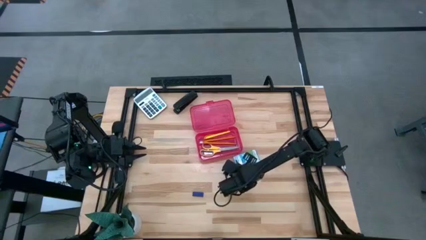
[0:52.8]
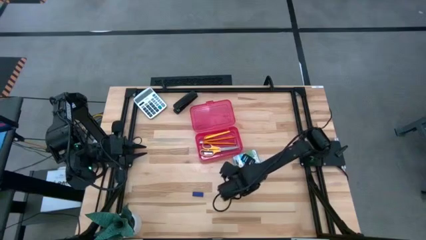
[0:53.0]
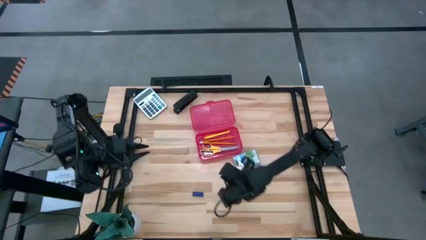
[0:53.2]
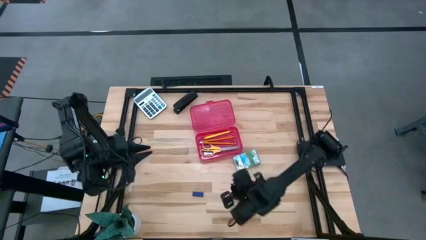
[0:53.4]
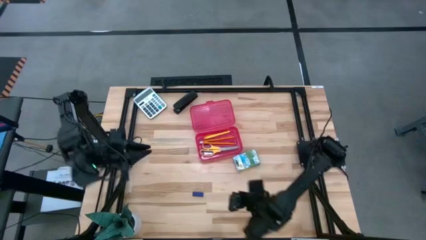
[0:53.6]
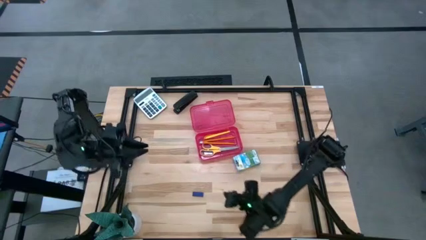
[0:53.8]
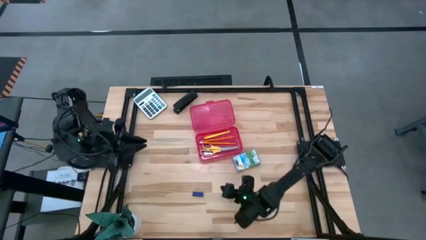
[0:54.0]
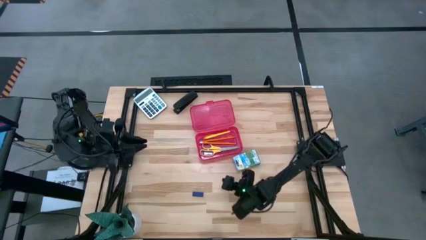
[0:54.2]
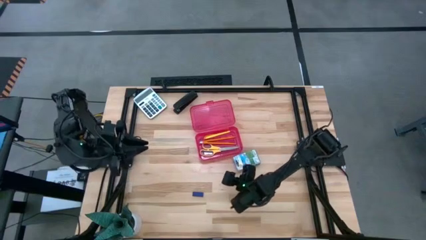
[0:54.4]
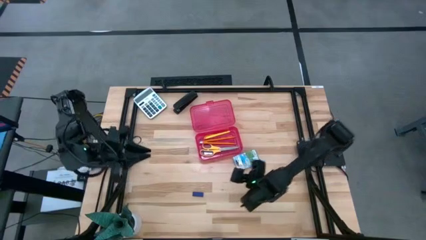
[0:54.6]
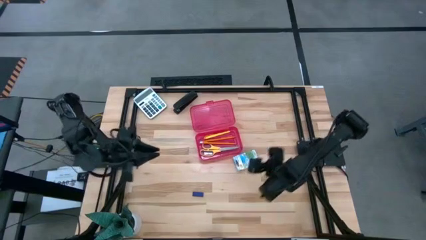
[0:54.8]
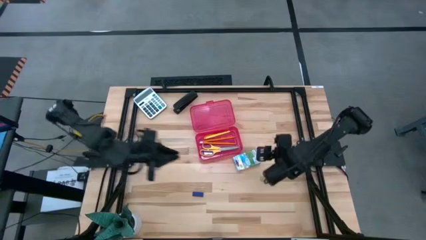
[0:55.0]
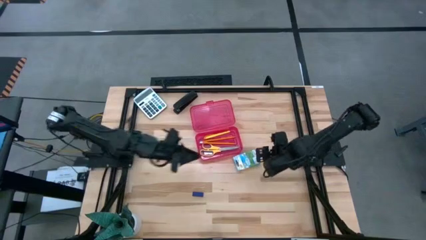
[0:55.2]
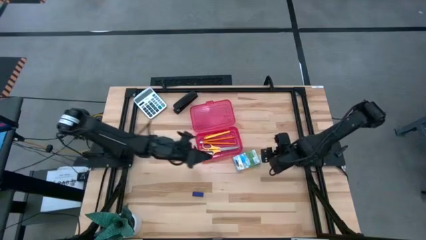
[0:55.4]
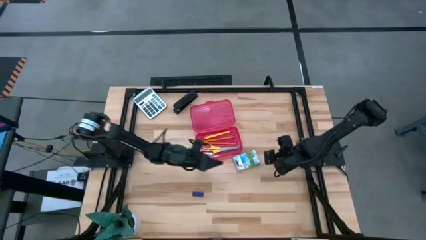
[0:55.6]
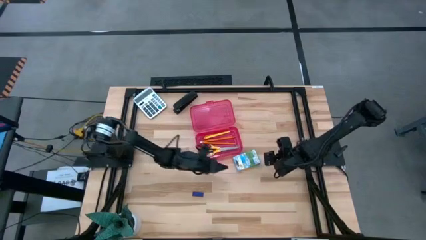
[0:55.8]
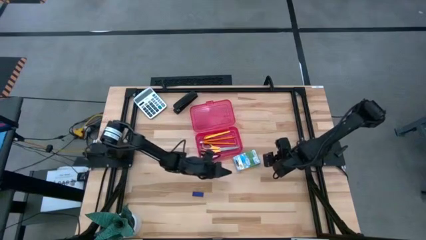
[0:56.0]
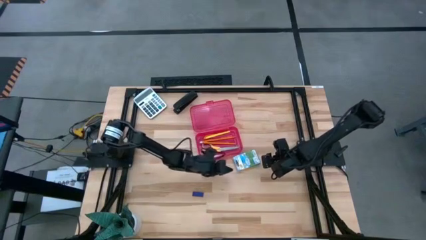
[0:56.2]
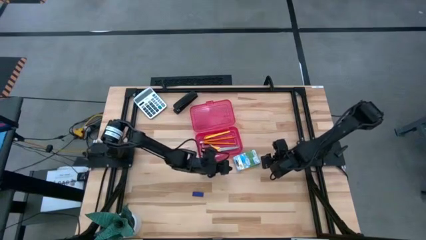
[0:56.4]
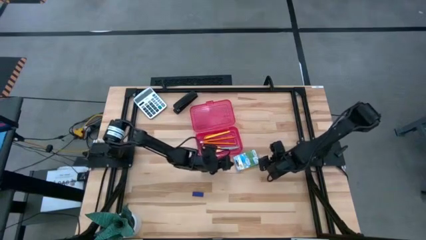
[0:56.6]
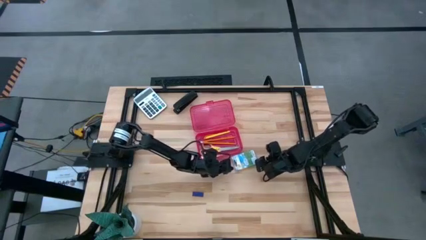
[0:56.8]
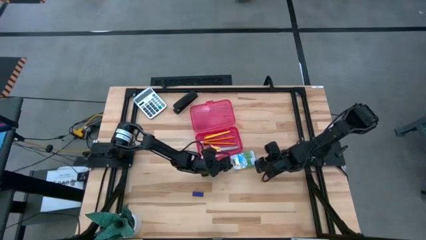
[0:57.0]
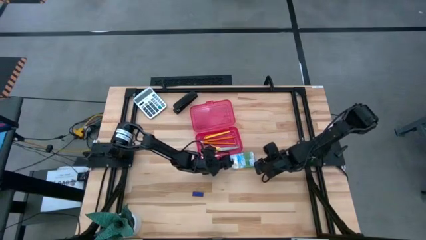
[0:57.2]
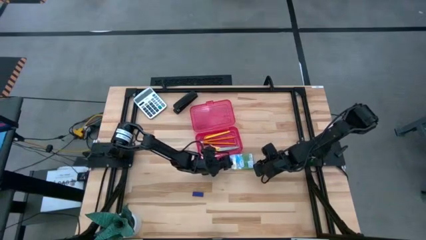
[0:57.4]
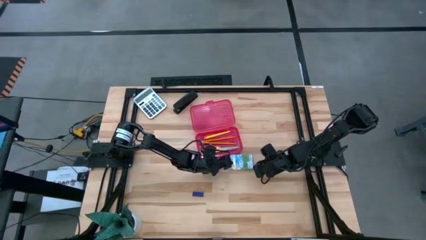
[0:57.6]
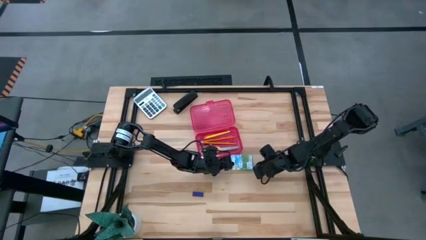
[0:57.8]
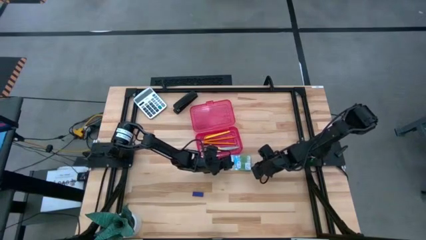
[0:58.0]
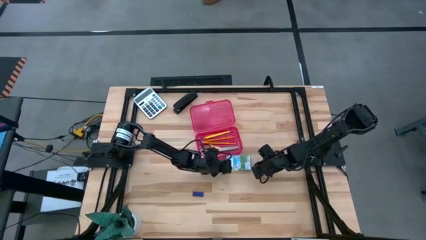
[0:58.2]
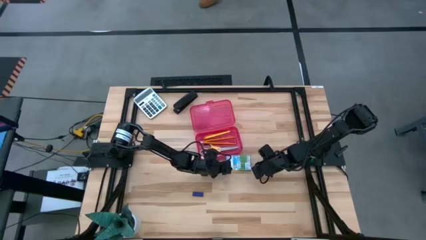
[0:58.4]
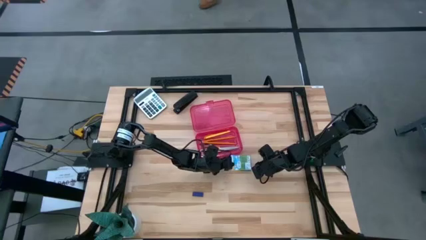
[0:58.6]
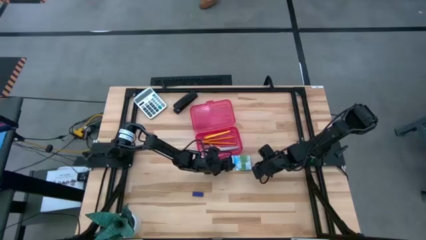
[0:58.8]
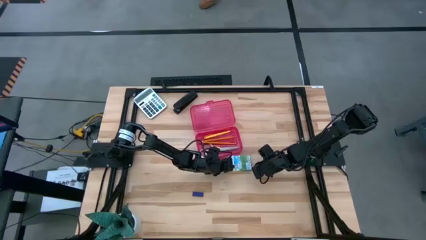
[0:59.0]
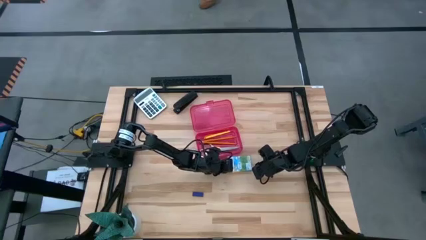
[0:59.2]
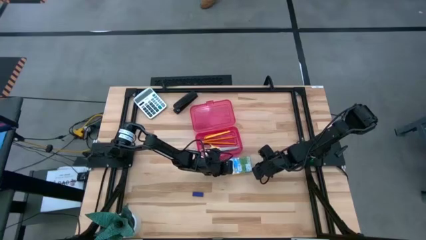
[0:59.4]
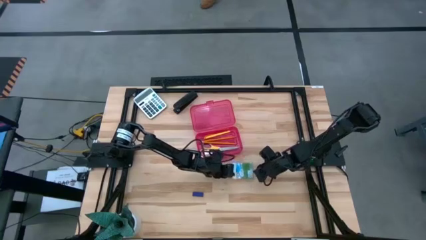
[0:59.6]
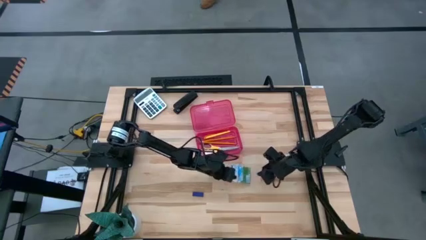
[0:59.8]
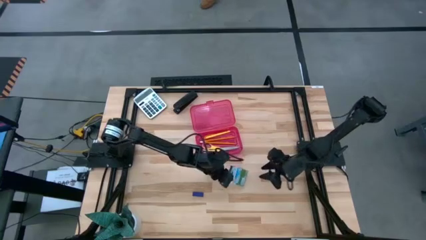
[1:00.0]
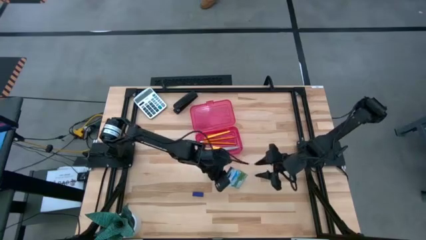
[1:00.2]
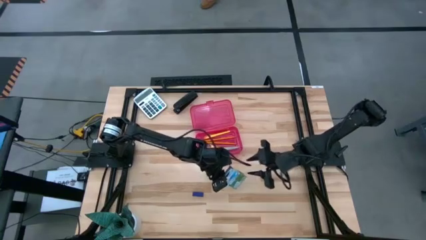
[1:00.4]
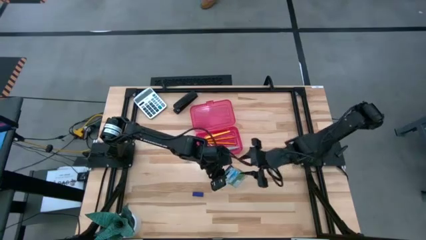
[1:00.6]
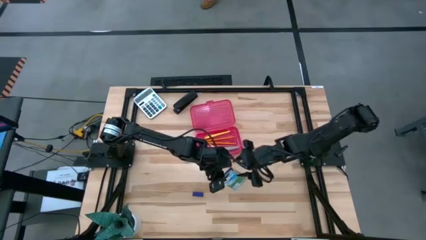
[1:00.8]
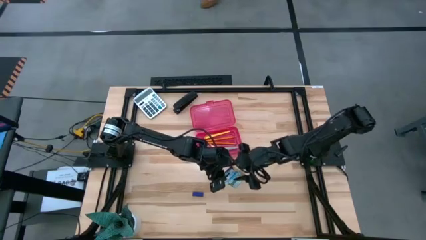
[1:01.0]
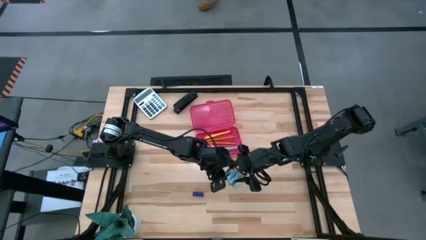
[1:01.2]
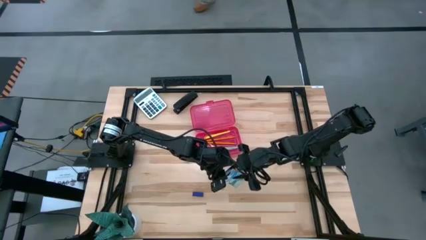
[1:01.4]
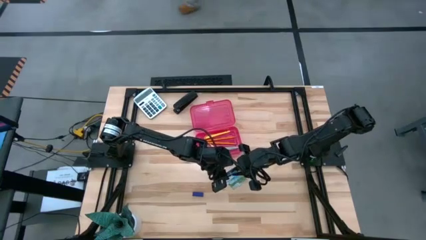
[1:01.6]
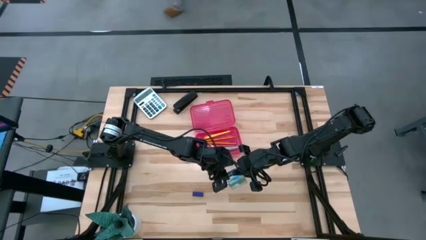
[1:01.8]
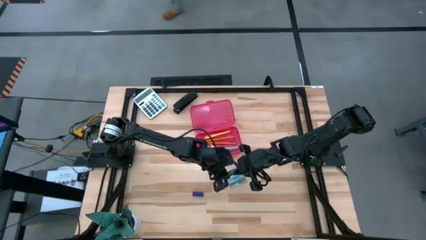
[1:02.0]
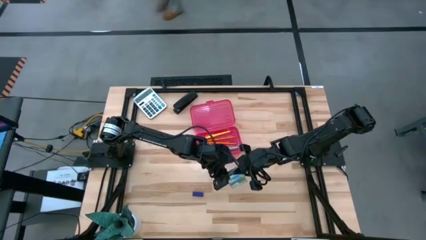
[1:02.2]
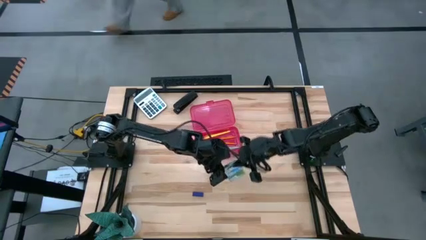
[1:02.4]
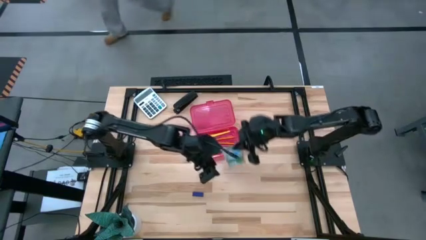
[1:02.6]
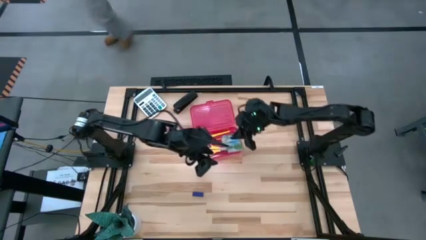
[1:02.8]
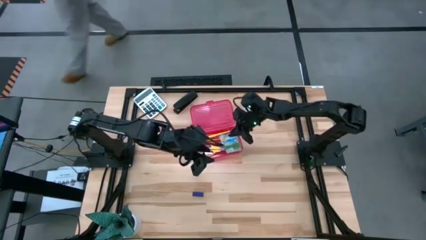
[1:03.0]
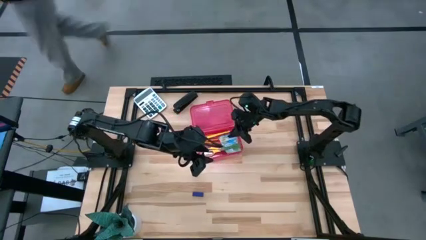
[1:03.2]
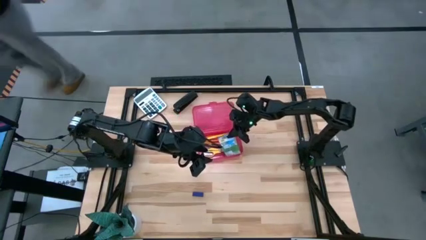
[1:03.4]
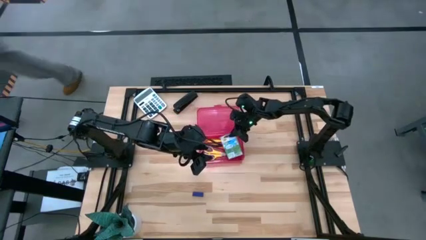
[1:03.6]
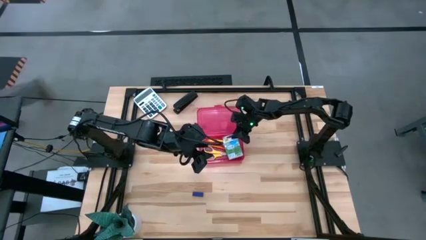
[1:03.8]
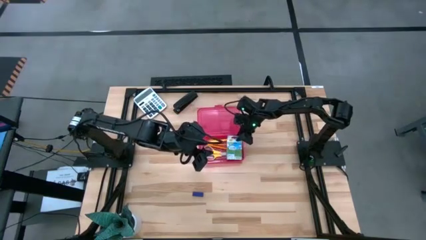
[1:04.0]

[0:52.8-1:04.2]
Task: Pack school essentials
Put the blue crayon box into the red supply box

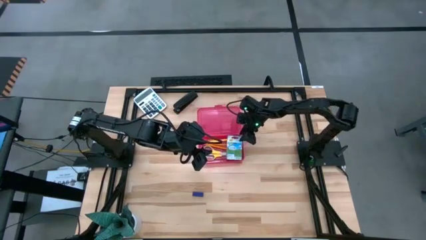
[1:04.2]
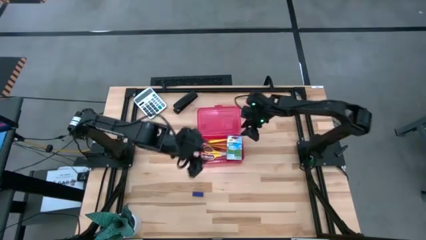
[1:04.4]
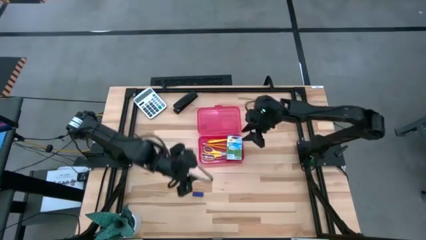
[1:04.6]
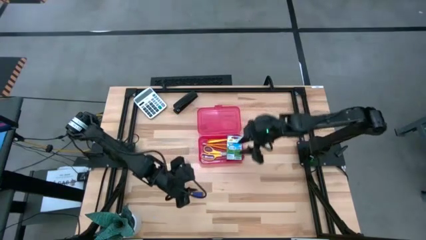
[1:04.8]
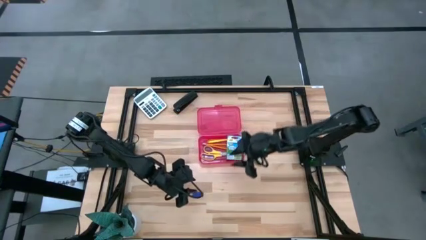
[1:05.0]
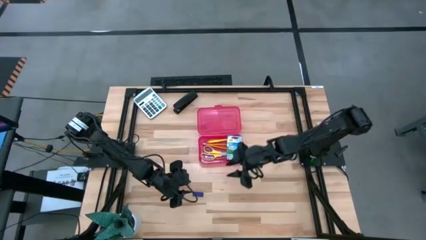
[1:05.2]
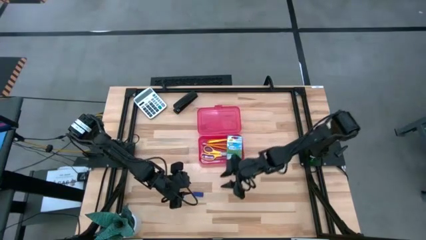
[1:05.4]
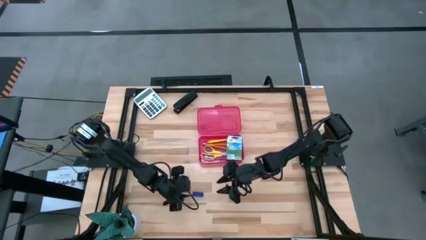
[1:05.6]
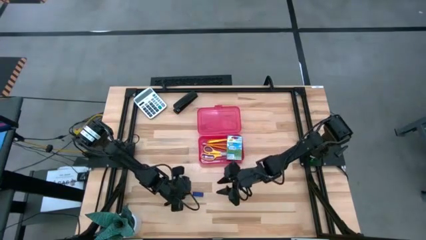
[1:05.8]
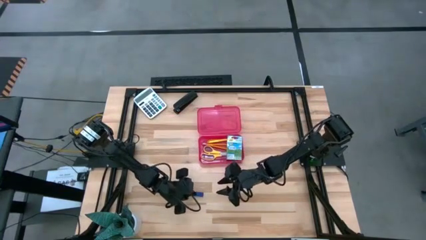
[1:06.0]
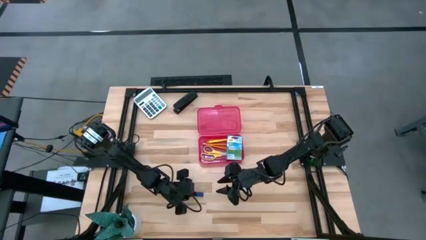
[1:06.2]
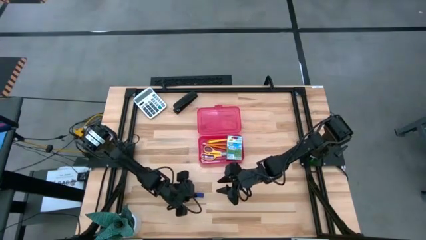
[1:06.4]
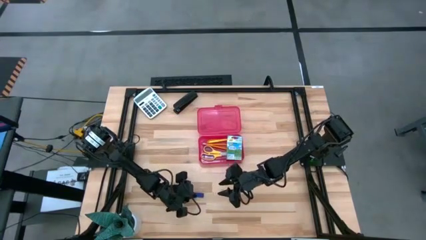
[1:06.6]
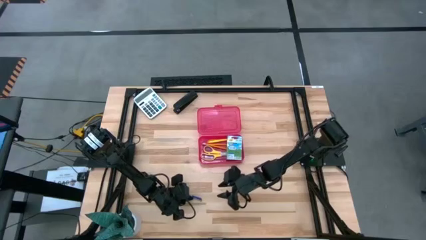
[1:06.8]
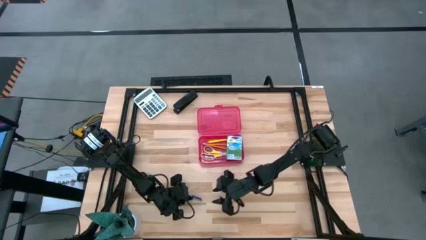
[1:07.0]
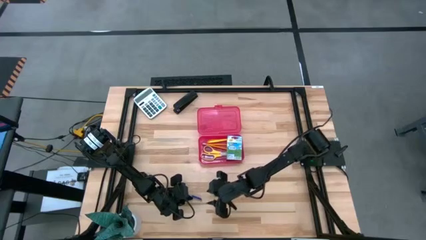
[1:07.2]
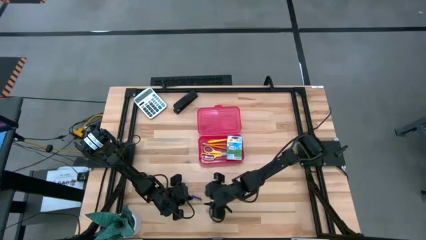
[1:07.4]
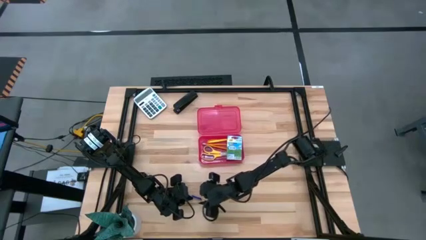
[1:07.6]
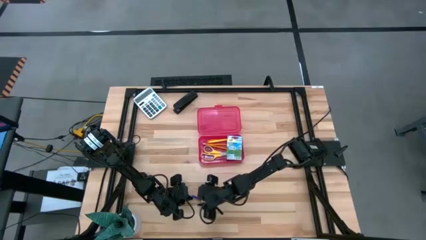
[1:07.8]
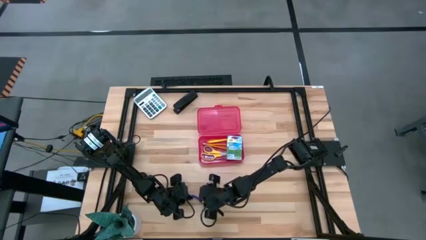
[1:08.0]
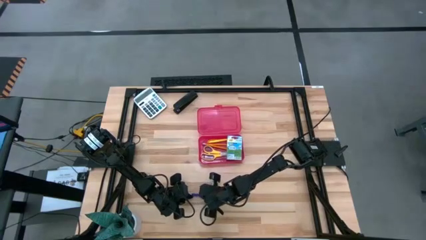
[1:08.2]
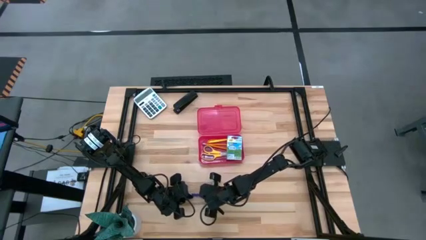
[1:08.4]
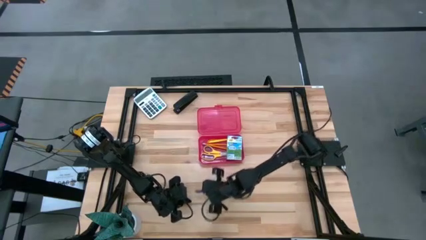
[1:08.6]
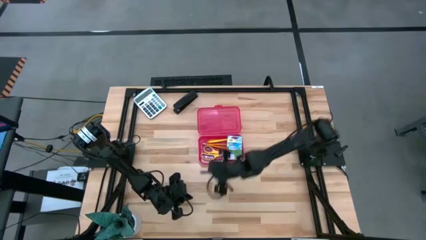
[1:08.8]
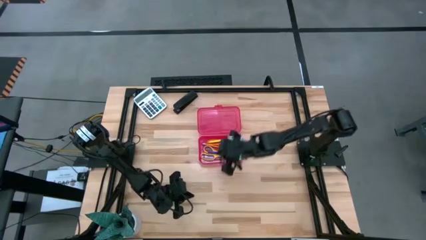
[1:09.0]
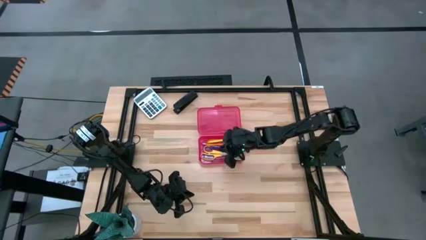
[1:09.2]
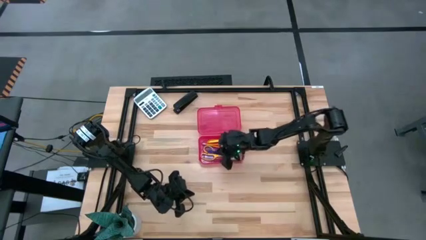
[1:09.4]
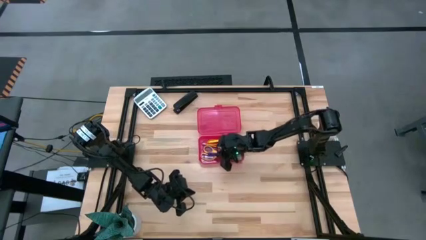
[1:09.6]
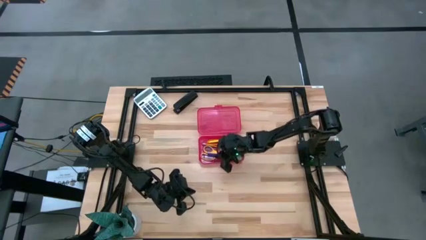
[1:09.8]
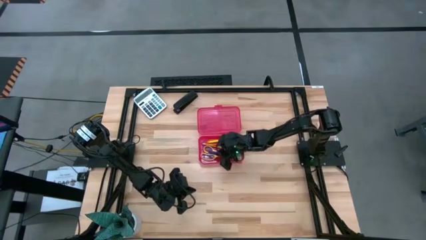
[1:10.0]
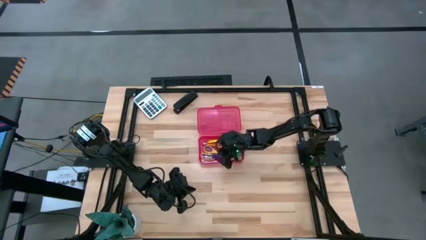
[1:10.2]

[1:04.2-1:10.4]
Put the blue eraser into the red supply box
